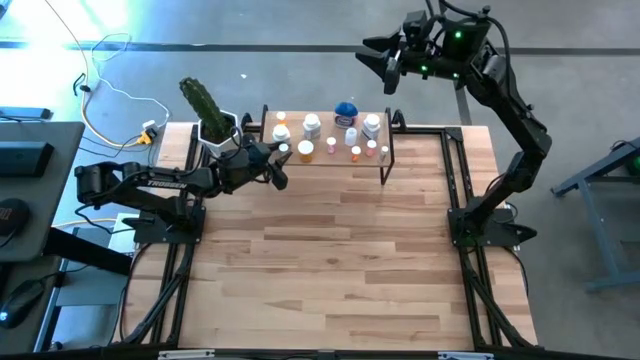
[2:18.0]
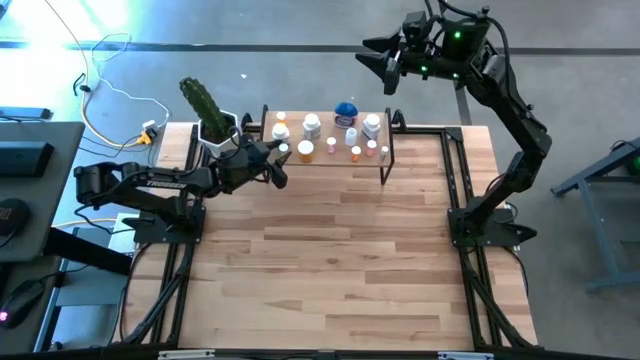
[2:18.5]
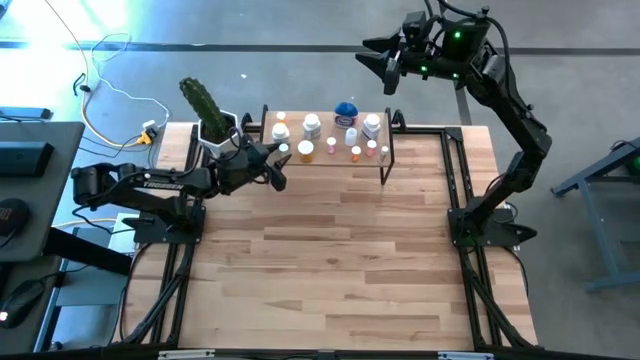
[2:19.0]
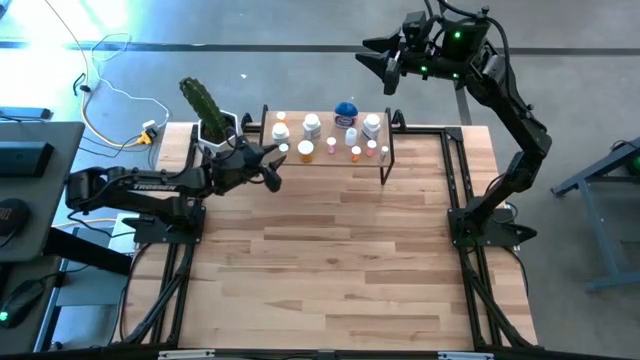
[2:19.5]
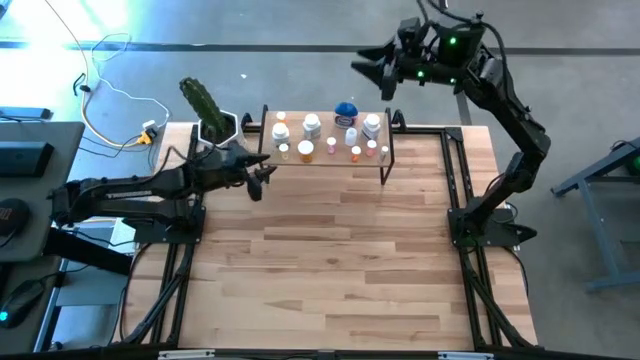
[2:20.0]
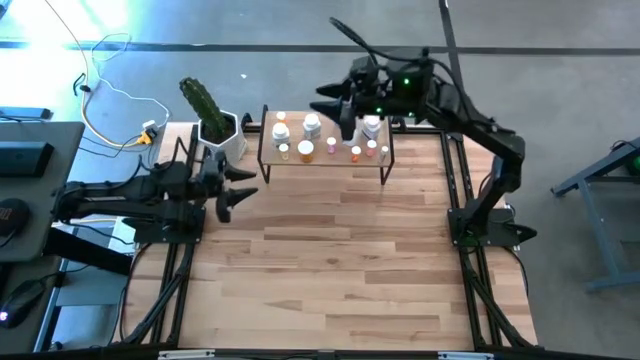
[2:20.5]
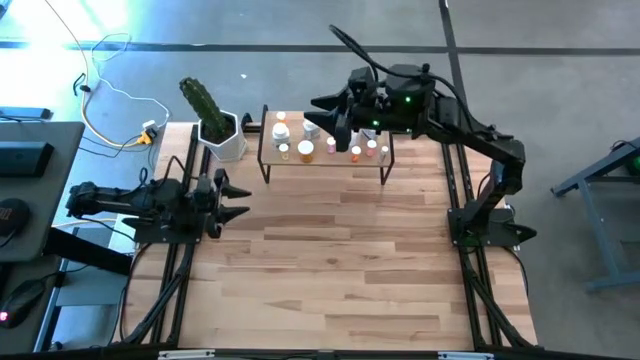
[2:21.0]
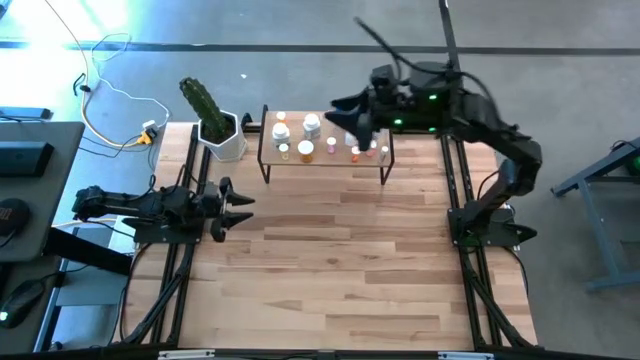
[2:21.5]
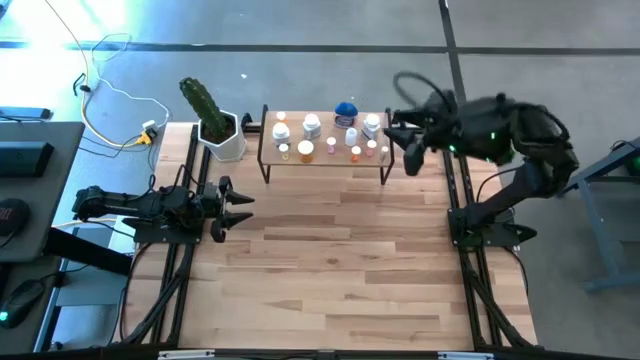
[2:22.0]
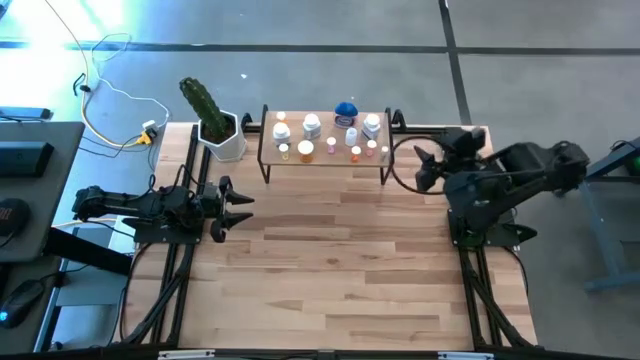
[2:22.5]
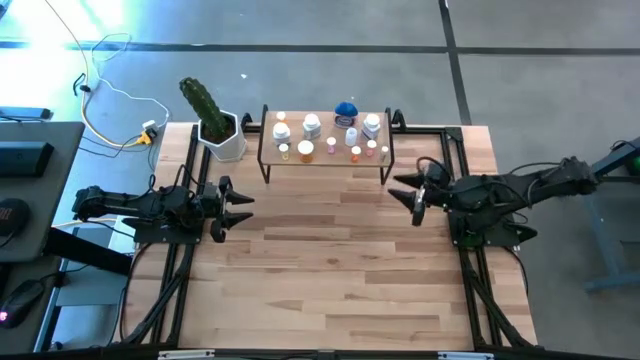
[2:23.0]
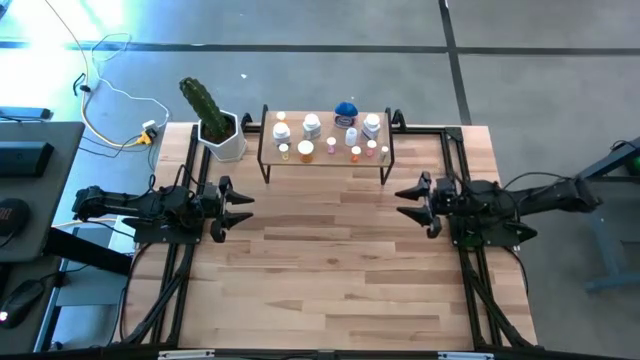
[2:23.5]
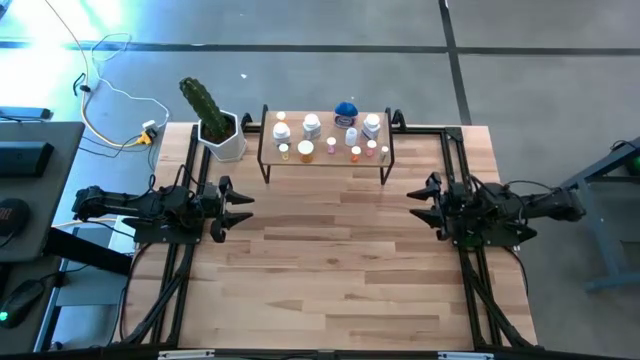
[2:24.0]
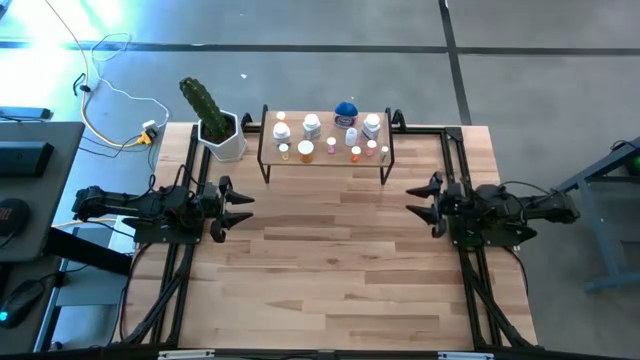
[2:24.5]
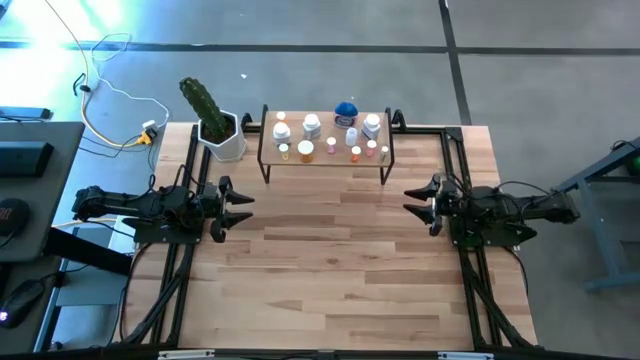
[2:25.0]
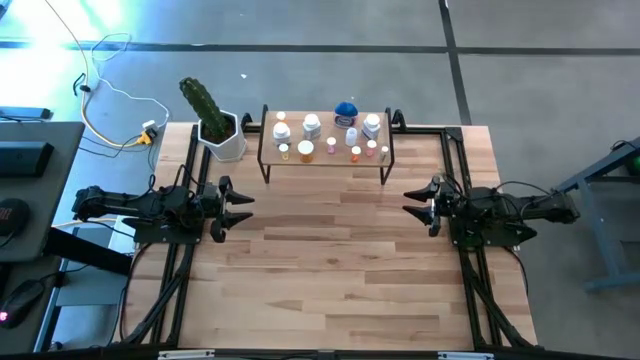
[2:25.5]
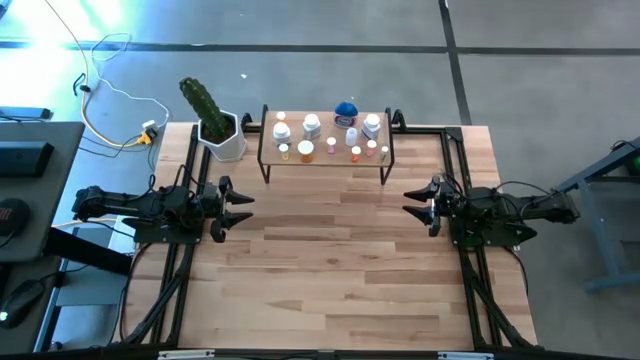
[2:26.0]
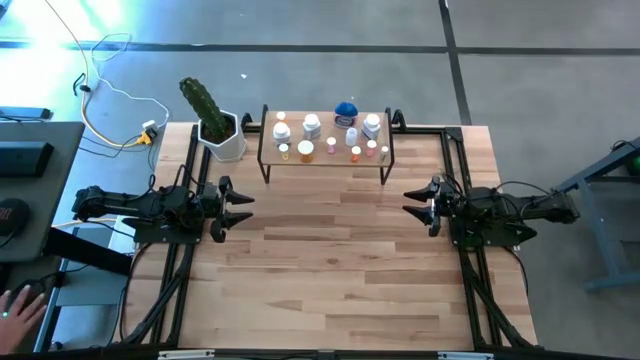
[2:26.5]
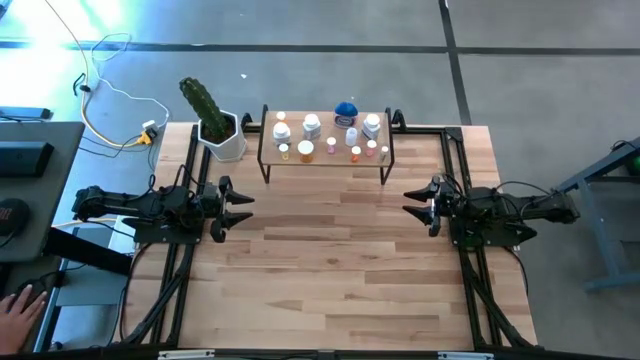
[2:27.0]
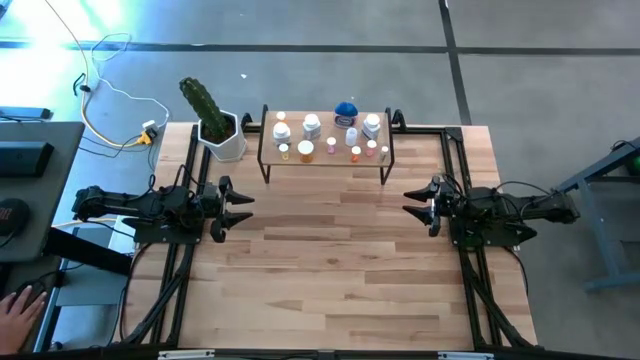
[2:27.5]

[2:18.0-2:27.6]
Task: Pick and place medicine bottles onto shelf by color
Return to Home Position

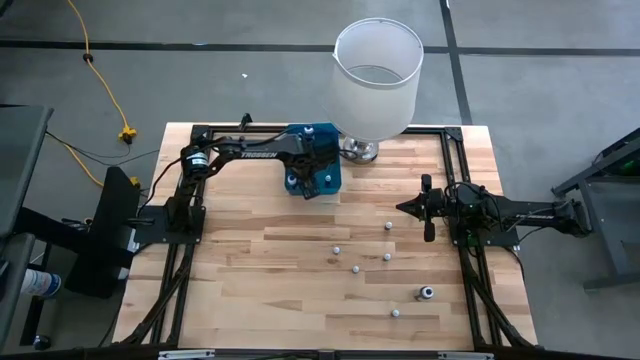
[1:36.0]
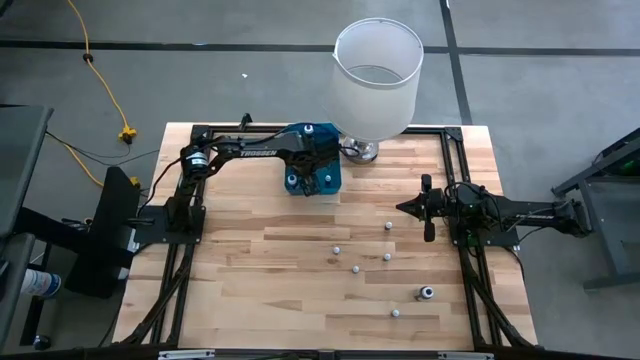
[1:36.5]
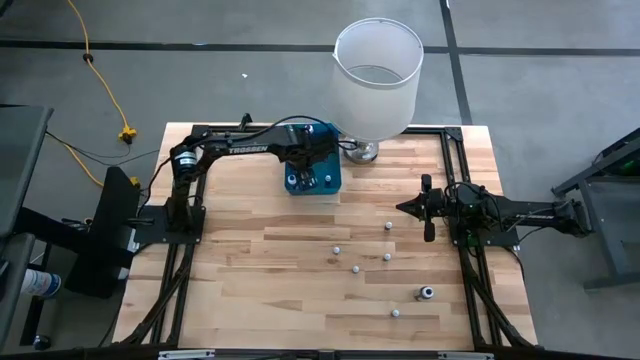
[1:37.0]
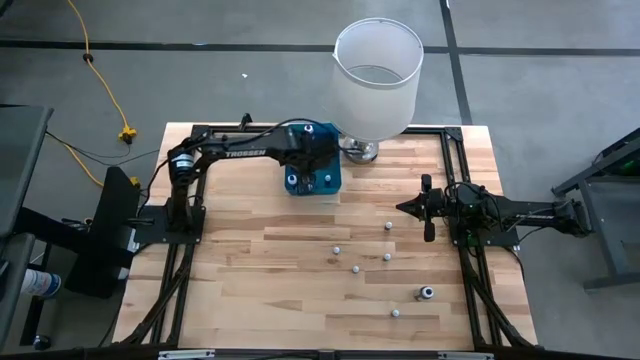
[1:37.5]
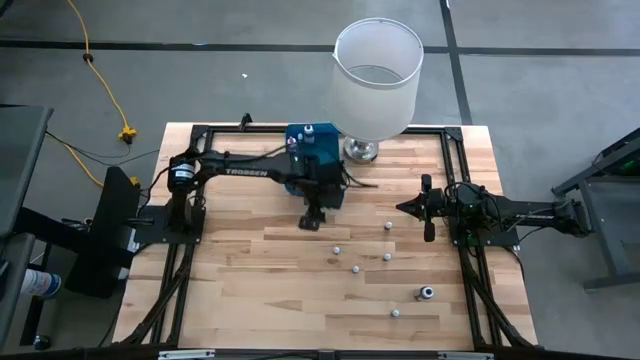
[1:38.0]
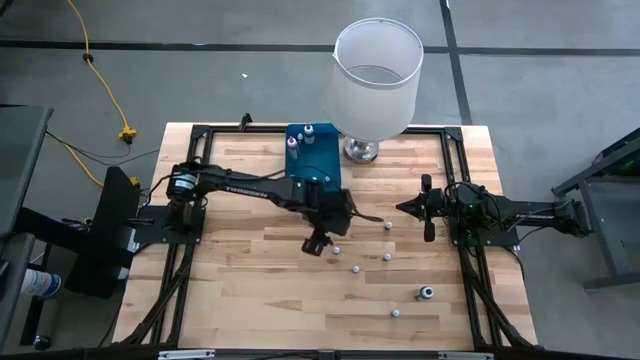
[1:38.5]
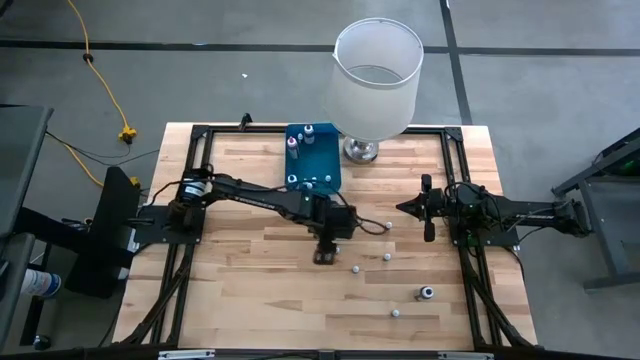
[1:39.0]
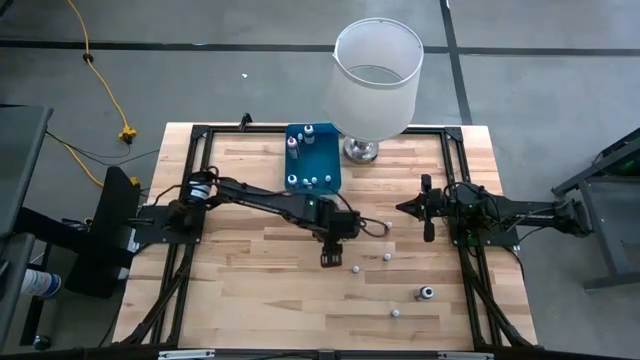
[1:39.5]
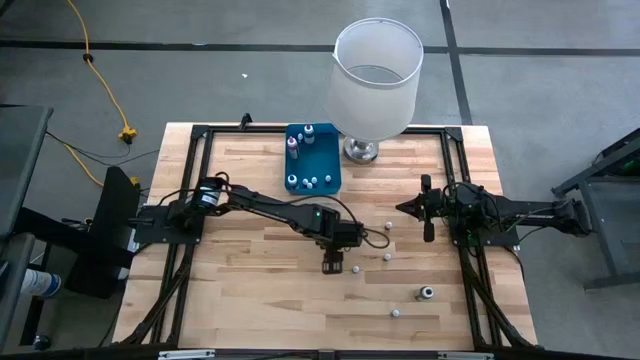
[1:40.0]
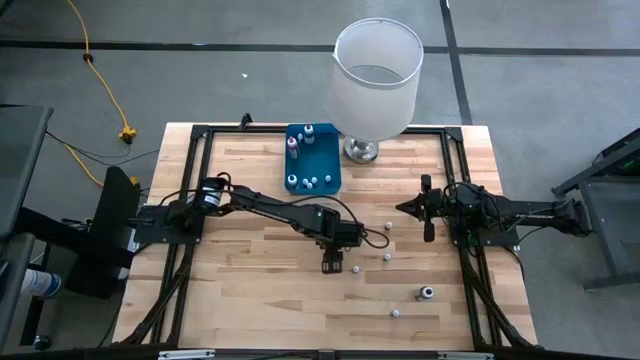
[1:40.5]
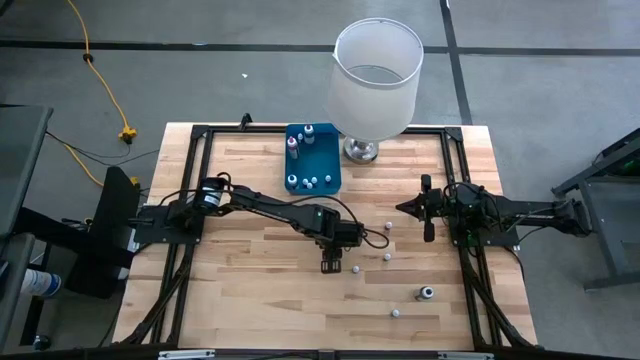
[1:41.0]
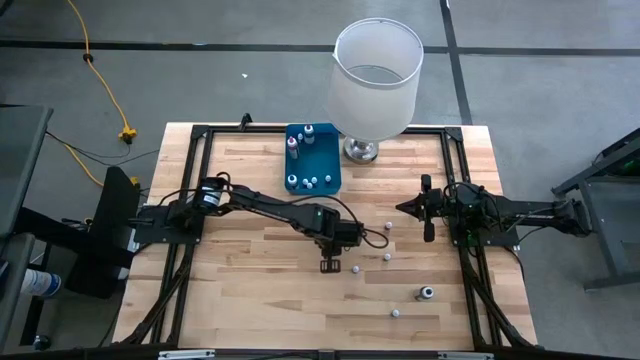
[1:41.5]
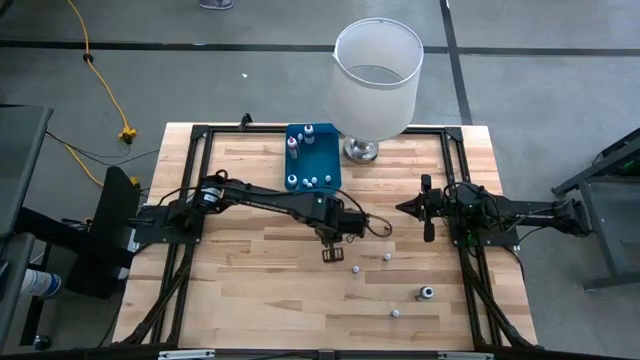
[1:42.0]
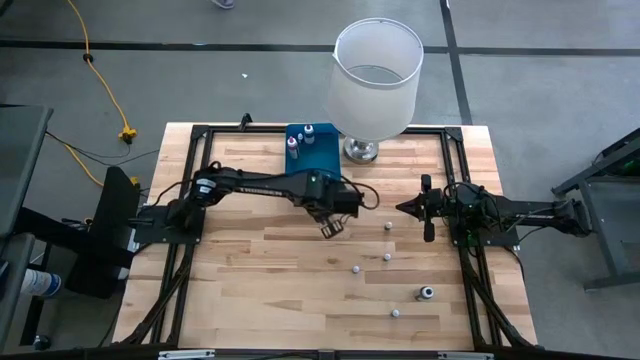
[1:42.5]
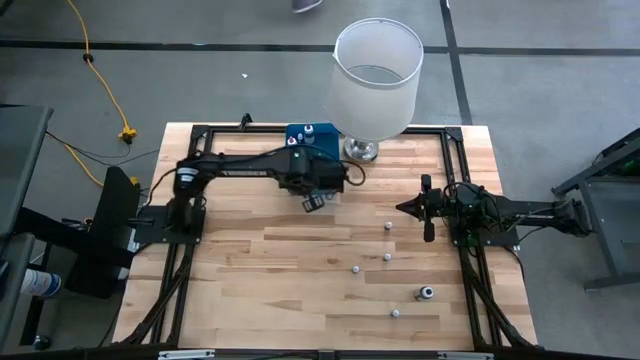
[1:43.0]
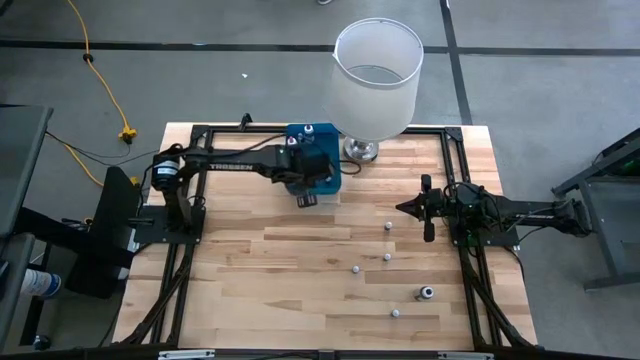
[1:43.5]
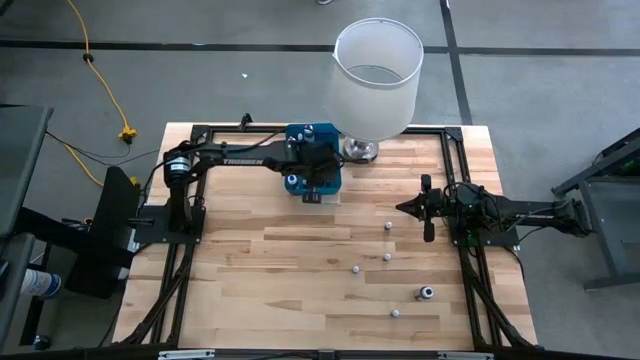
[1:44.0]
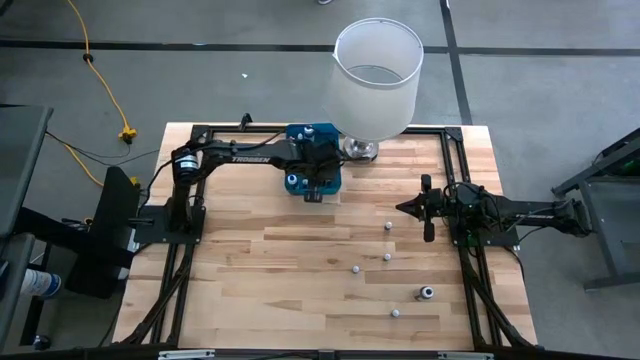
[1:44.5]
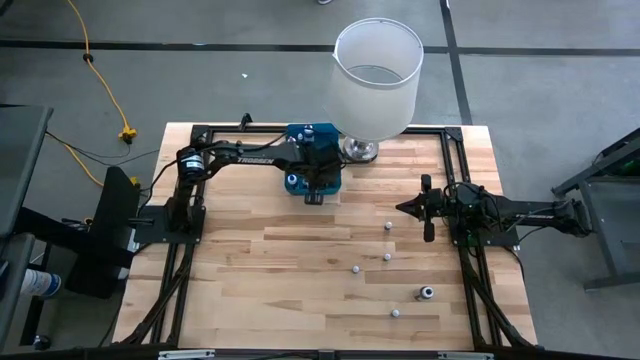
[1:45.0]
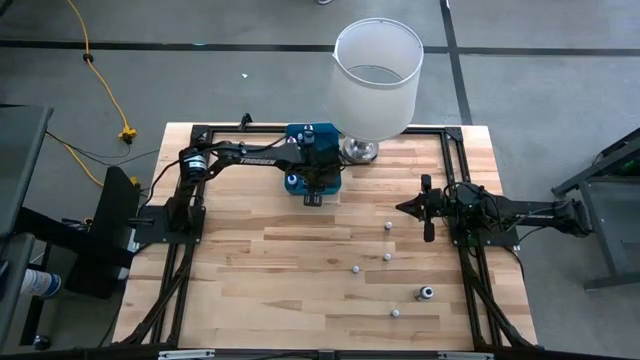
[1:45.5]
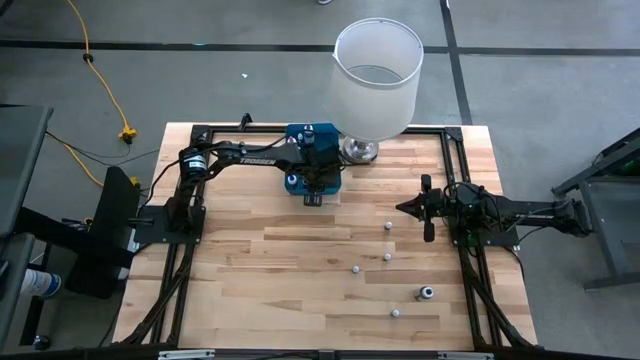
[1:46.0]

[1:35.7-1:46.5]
Task: Pick & Place food coloring
Put the left small black food coloring bottle into the blue bin
